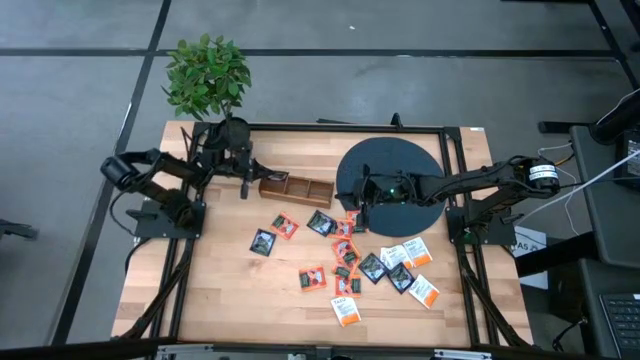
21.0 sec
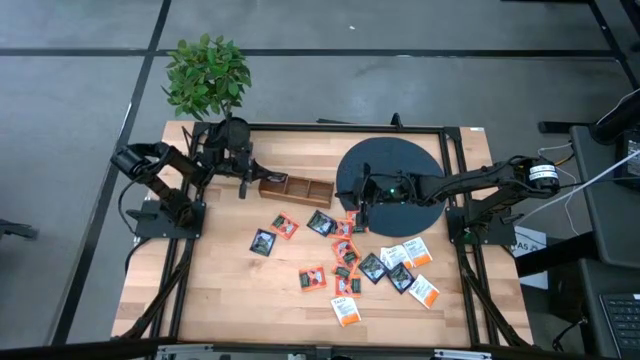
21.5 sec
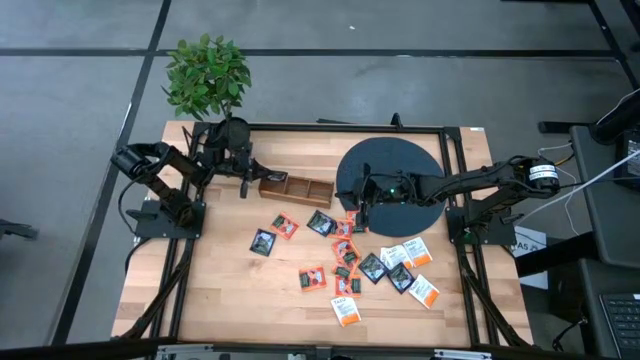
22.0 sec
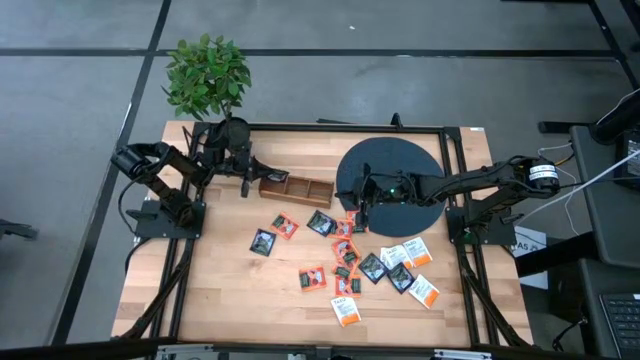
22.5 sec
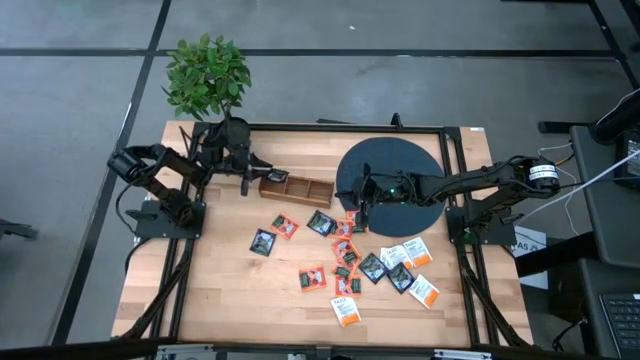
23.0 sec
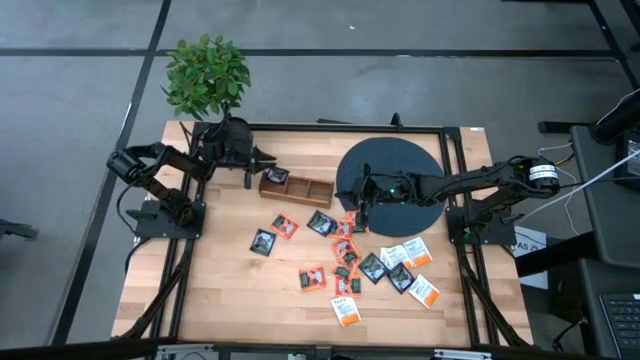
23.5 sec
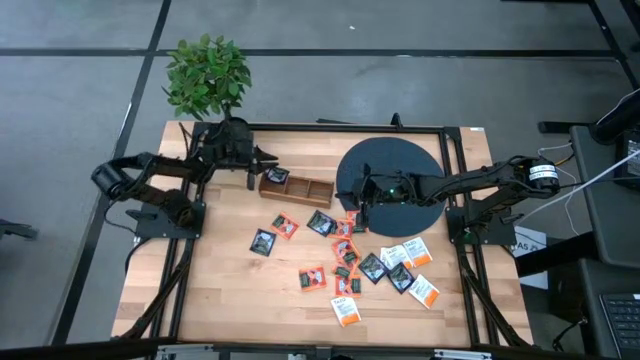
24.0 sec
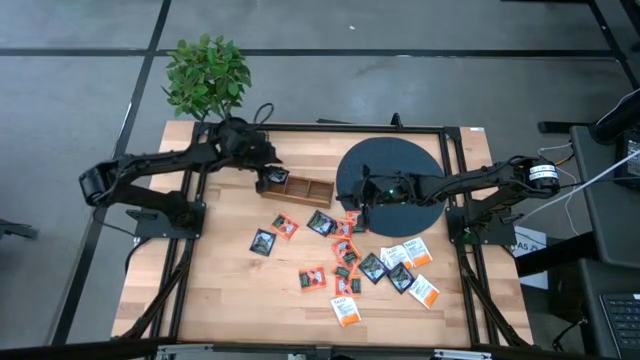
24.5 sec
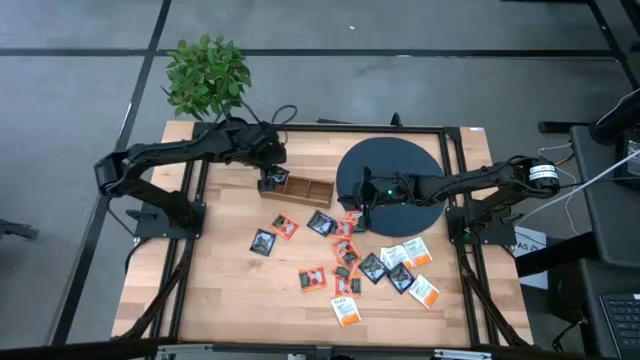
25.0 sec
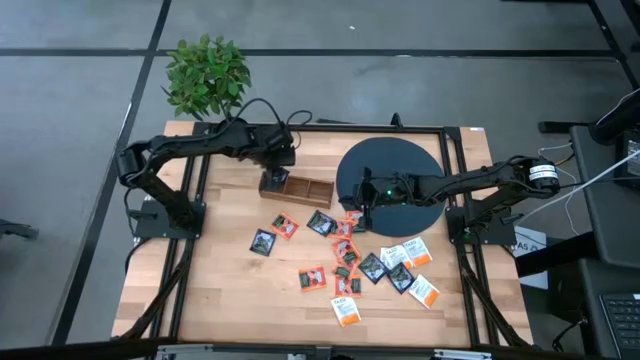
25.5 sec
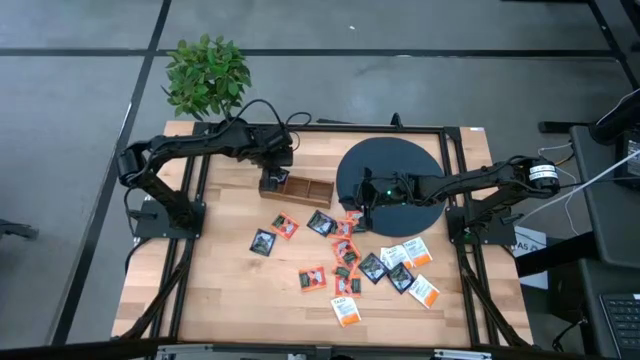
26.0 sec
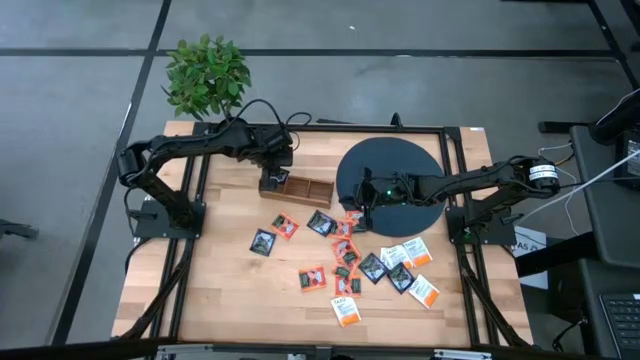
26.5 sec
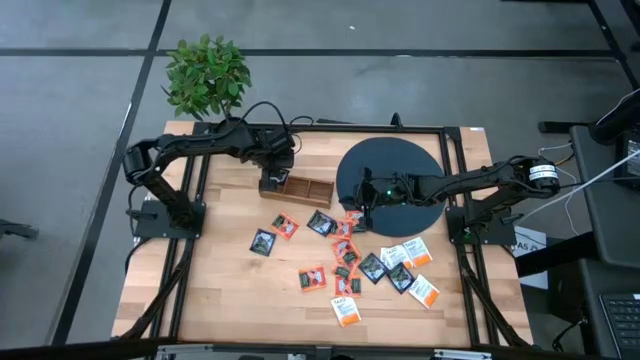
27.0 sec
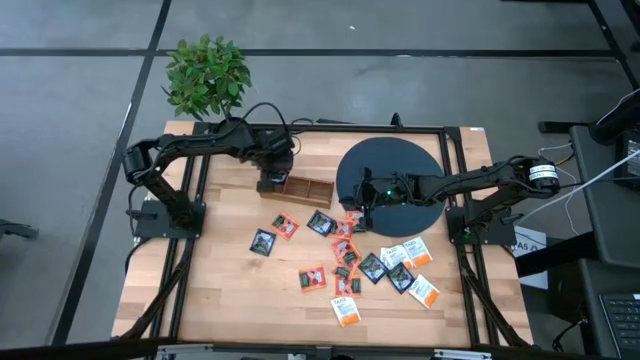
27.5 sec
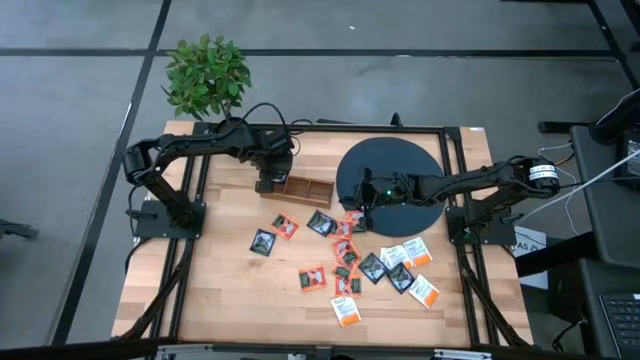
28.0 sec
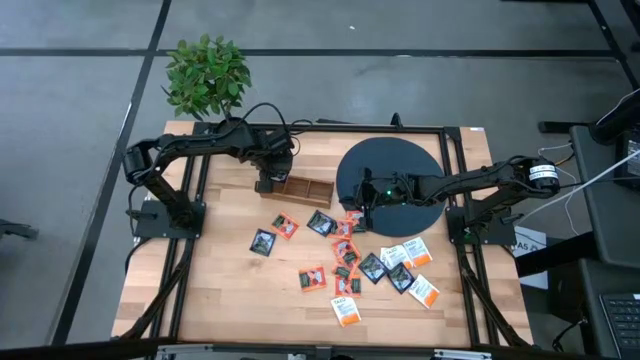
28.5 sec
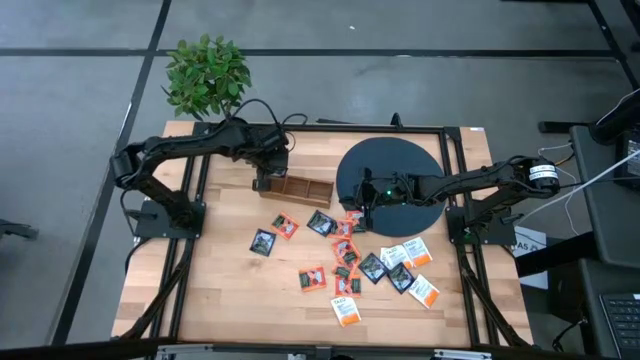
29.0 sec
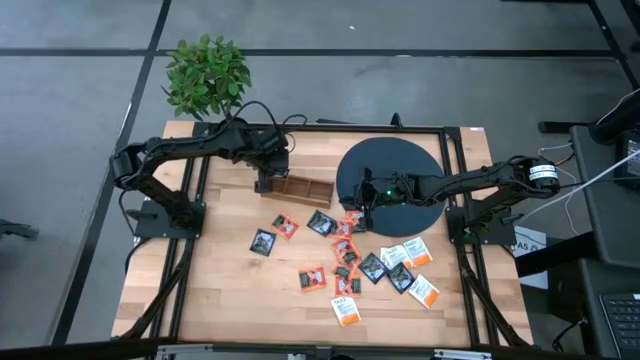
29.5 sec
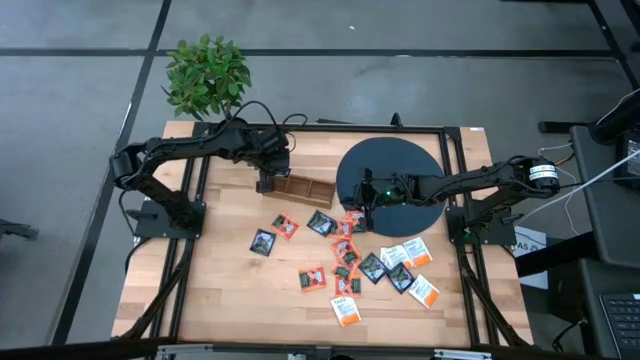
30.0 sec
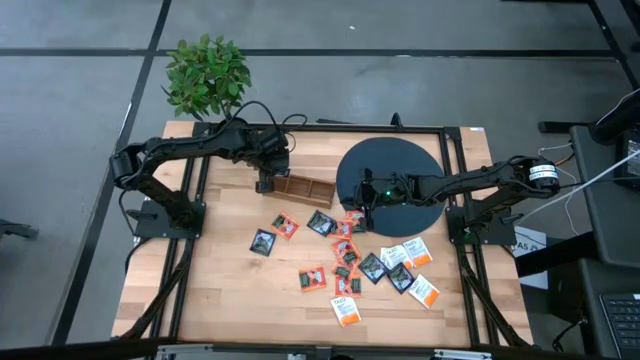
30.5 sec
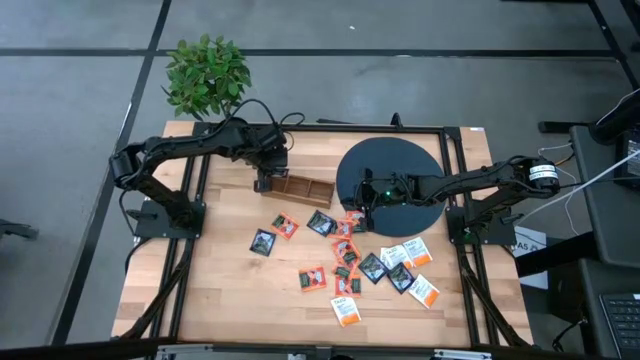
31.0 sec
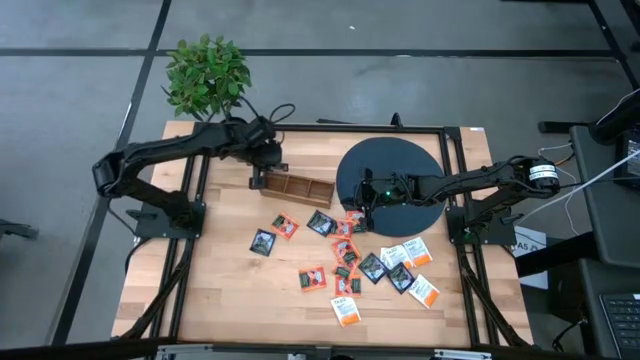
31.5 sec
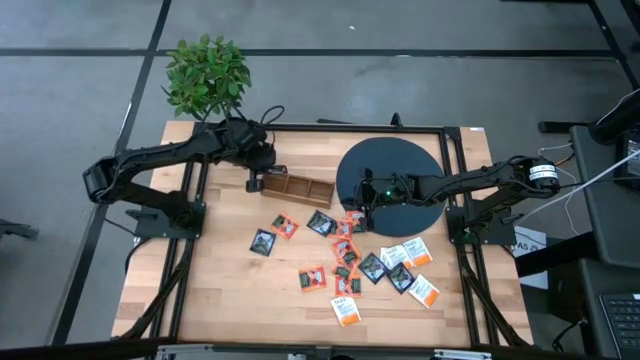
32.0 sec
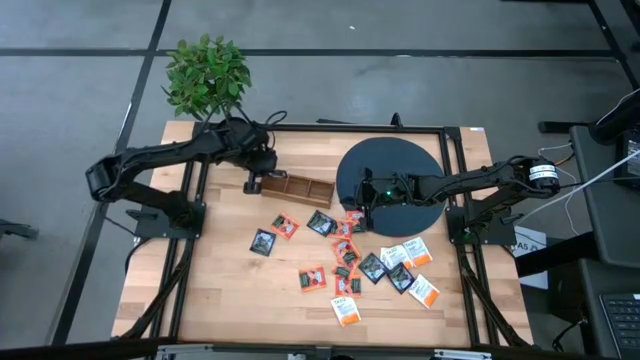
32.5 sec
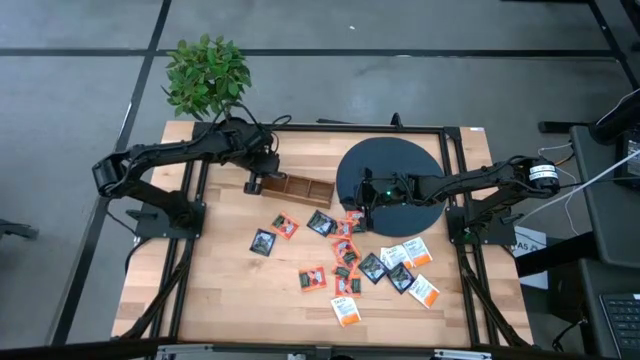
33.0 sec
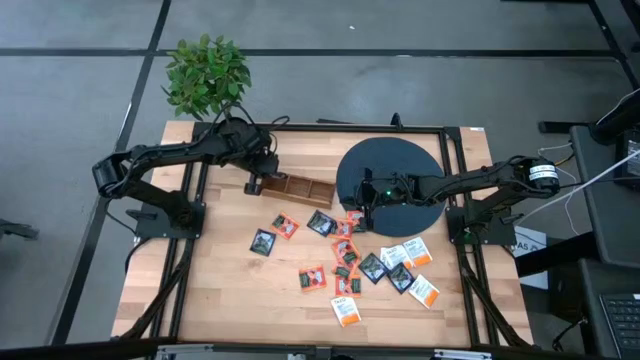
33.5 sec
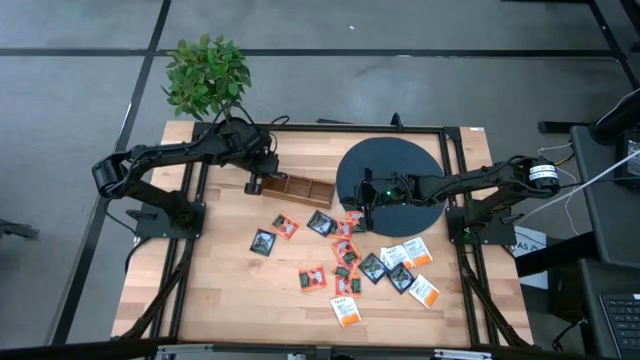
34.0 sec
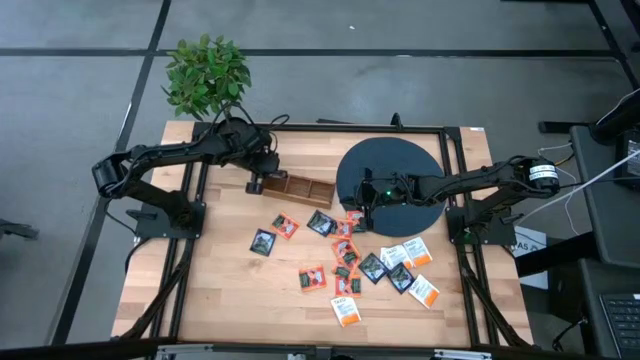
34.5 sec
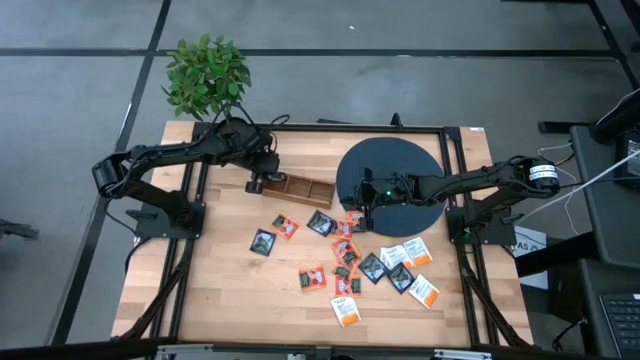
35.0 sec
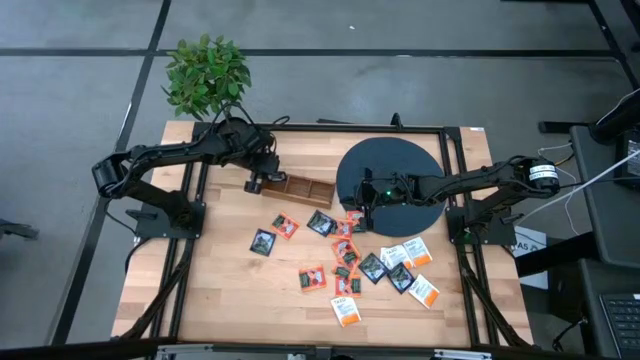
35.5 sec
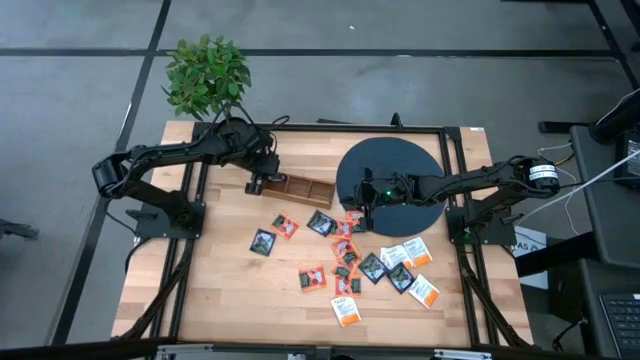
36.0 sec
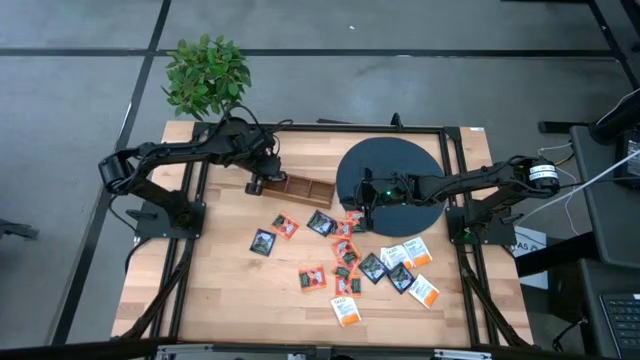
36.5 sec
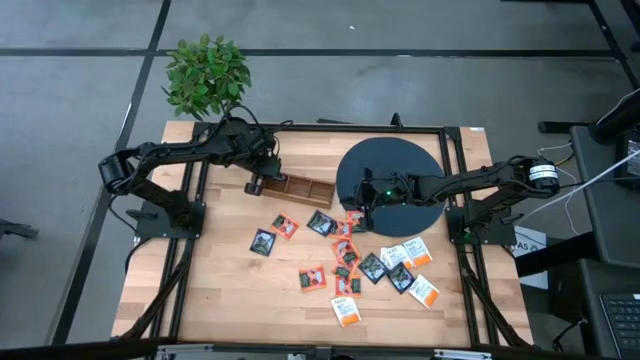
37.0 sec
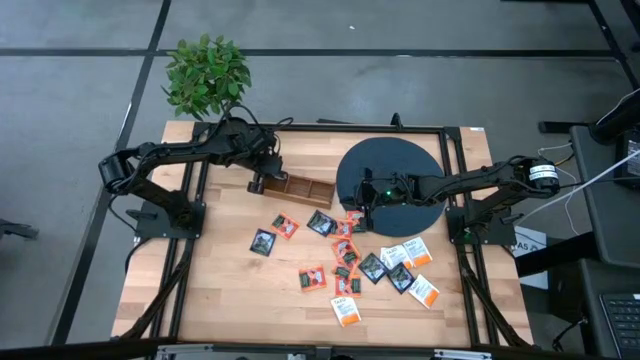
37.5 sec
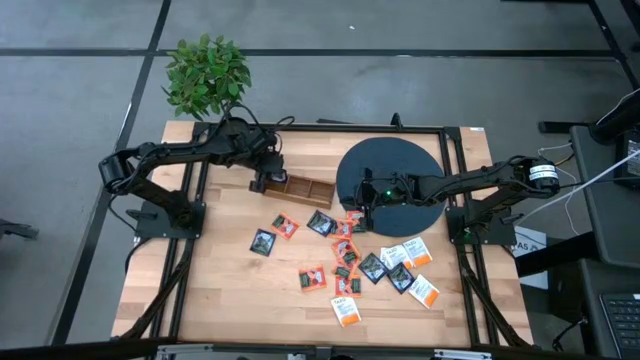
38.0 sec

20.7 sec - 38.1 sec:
Task: Pick & Place Tea
Put the dark blue tea bag into the left section of the wooden organizer

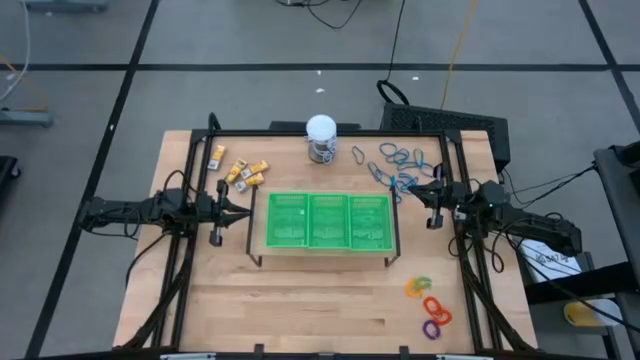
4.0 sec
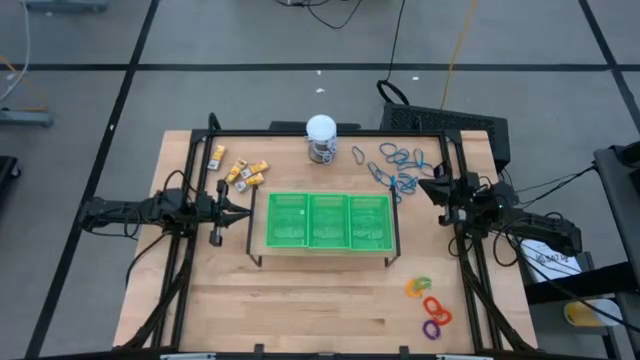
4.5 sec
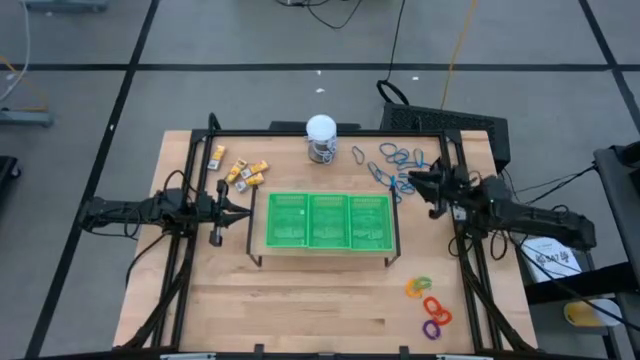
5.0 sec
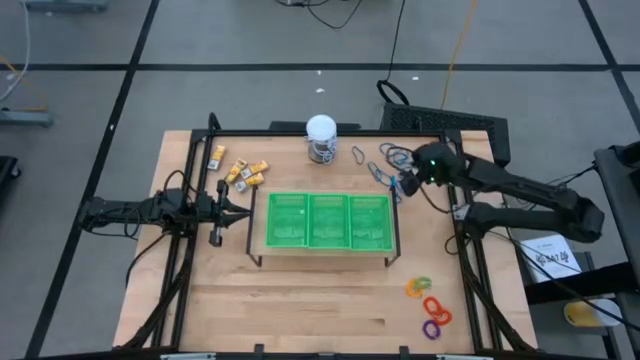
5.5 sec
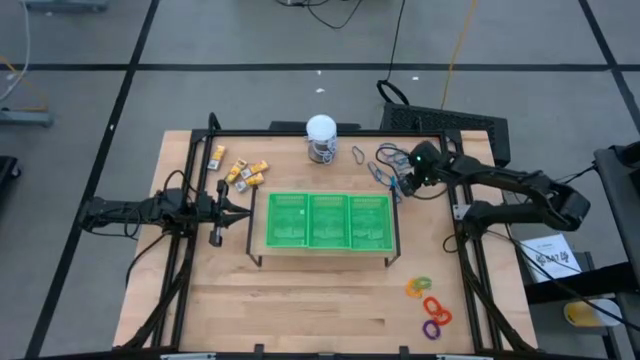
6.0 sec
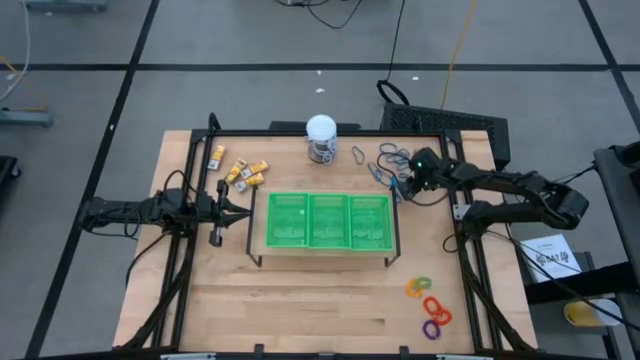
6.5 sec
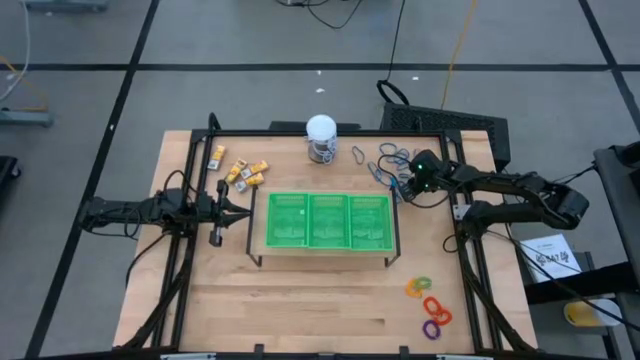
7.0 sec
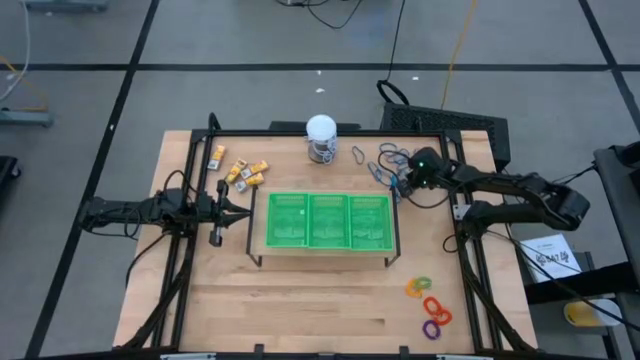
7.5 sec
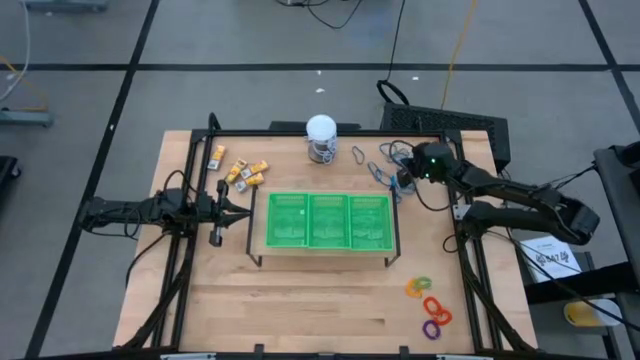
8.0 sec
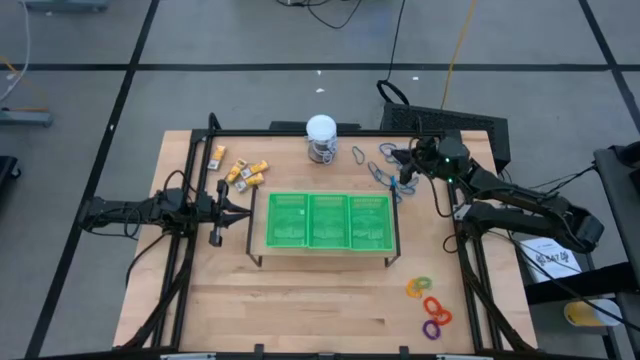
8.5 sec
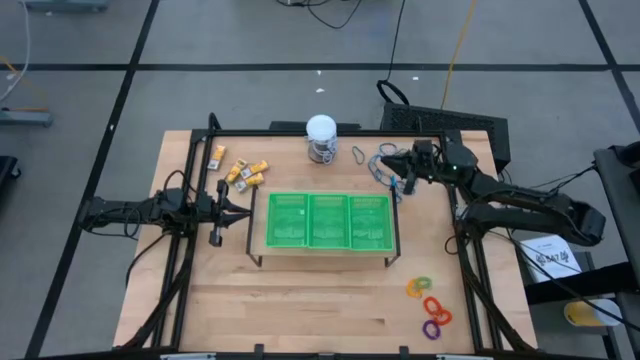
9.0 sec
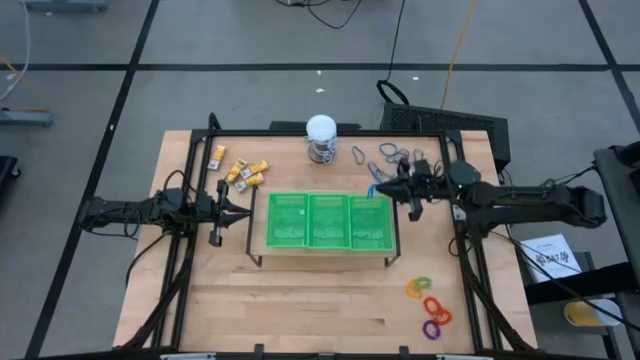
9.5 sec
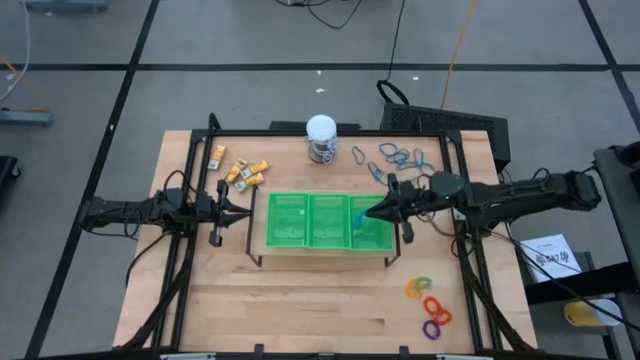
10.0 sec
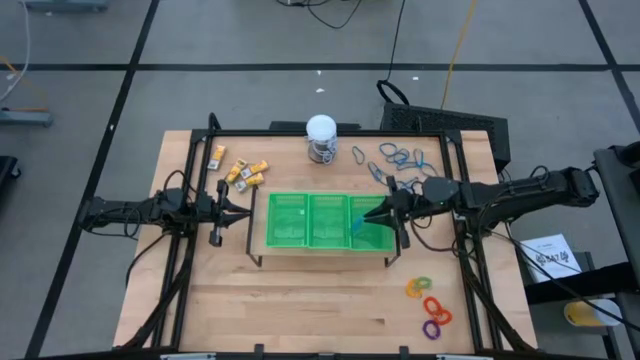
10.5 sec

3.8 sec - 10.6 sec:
Task: Pick & Place Office Desk Supplies
Put the blue rubber band into the right green bin on the shelf
